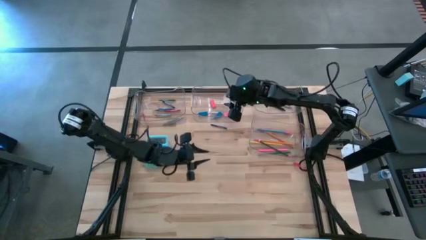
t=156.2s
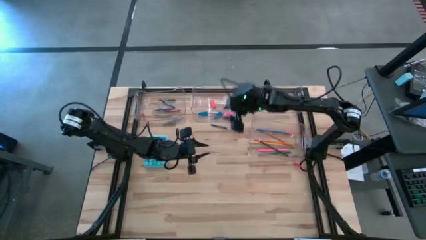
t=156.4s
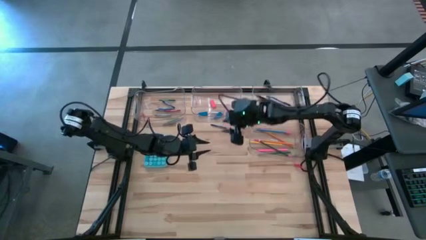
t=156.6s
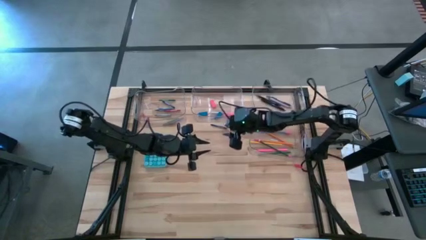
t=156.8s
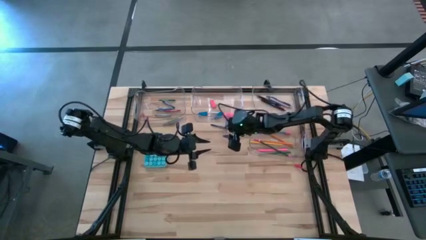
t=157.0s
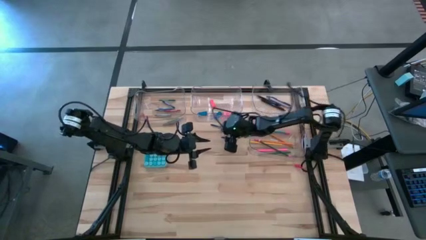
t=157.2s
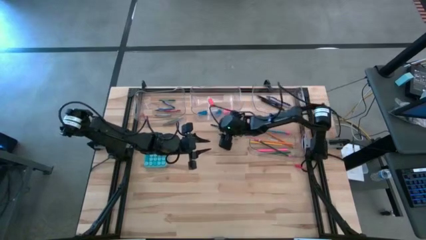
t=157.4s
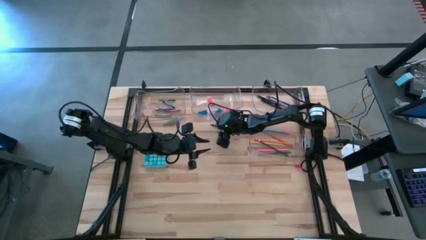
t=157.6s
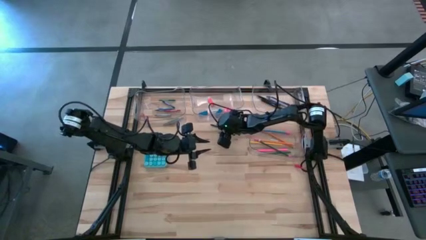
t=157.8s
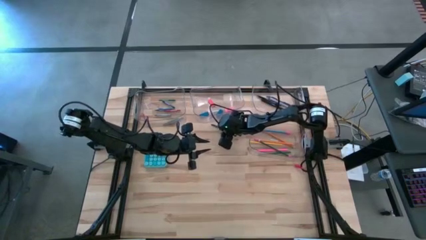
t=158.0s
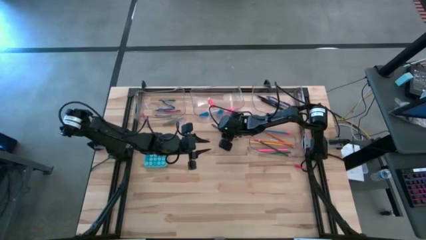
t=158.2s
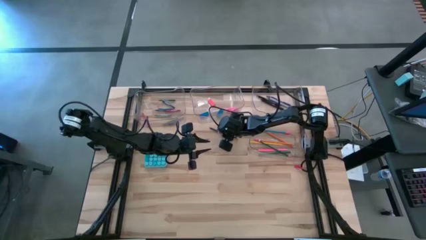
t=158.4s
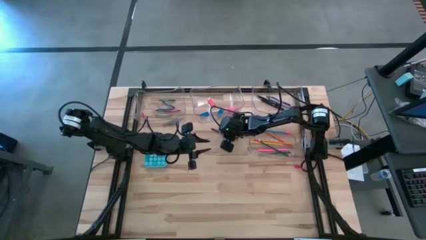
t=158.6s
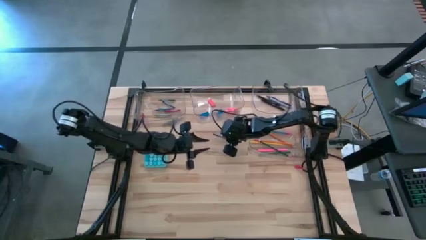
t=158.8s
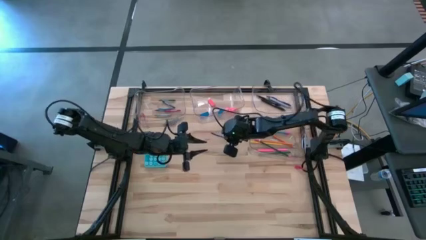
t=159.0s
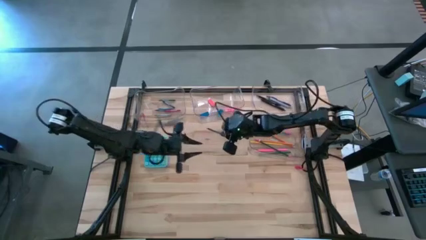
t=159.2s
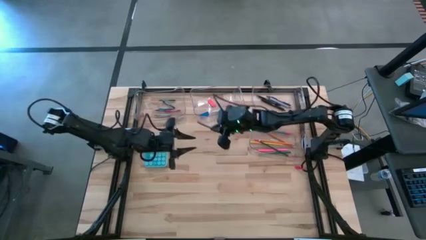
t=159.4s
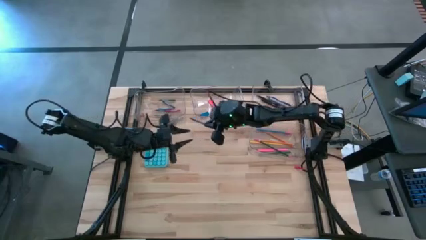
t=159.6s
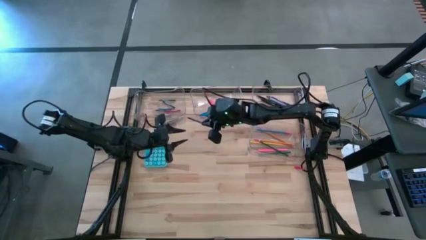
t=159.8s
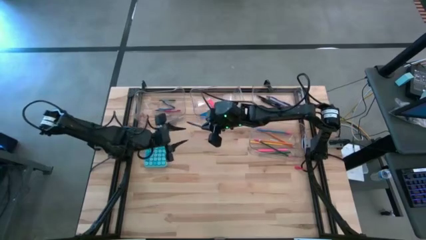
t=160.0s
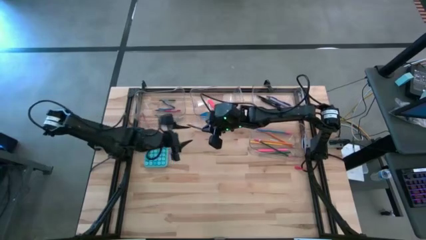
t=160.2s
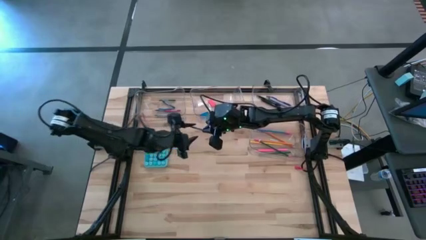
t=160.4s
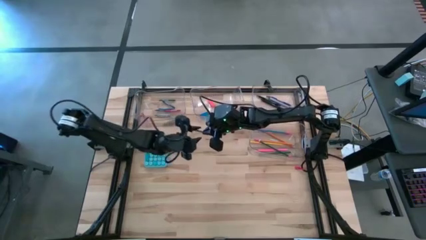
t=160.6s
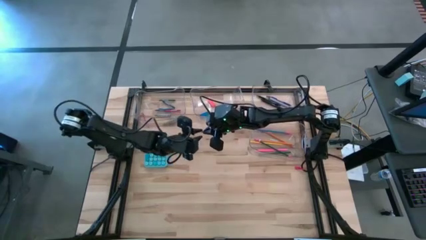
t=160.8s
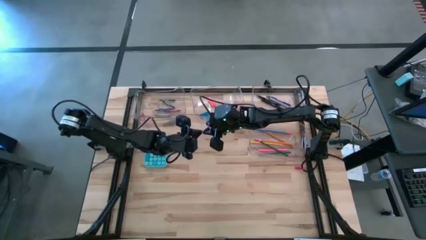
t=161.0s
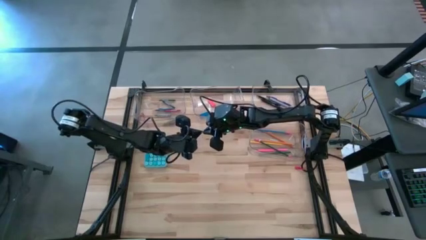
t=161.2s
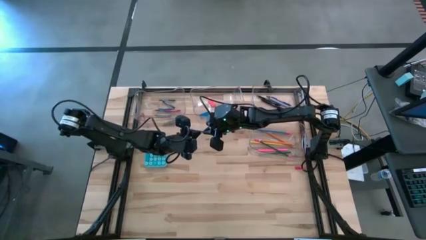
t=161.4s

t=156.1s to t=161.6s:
Task: Sort crayons/erasers/pens/pencils in bins
Put the blue crayon into the top left transparent bin

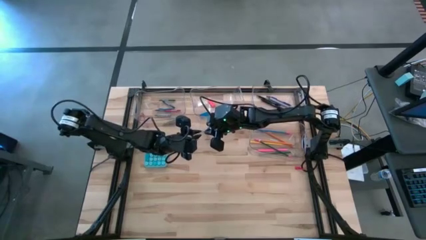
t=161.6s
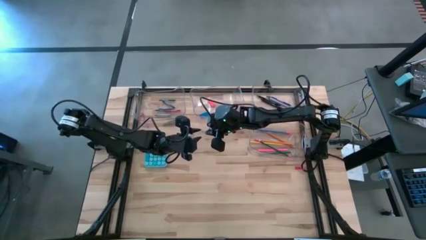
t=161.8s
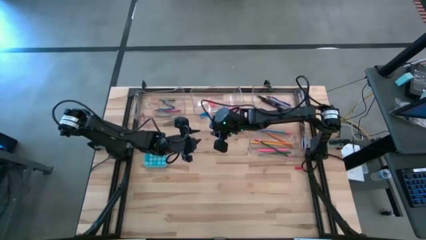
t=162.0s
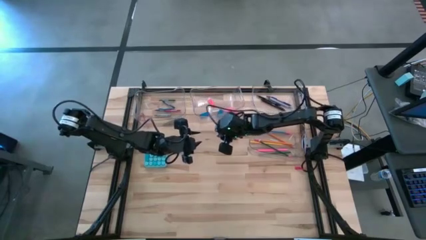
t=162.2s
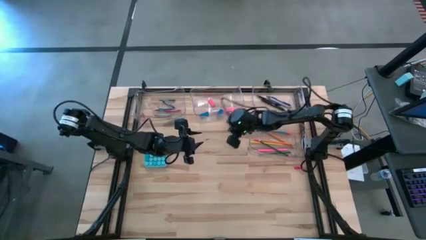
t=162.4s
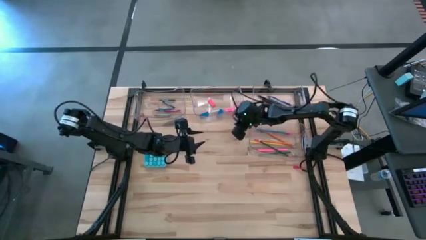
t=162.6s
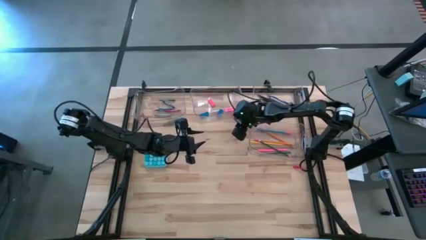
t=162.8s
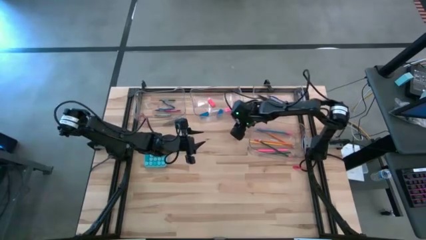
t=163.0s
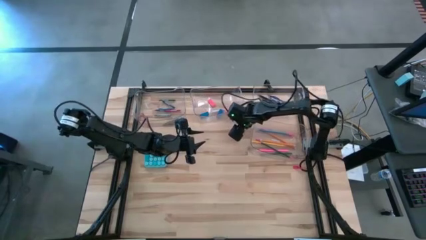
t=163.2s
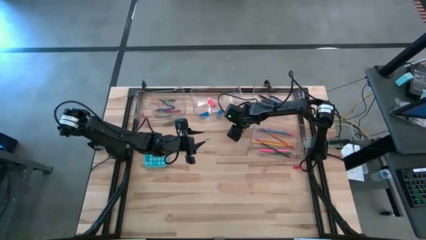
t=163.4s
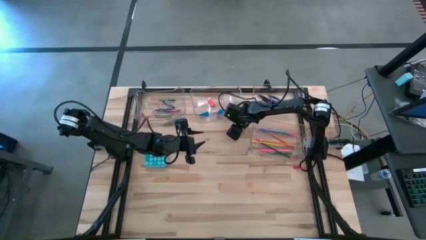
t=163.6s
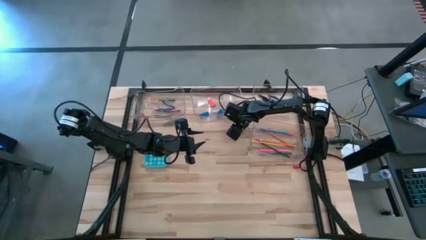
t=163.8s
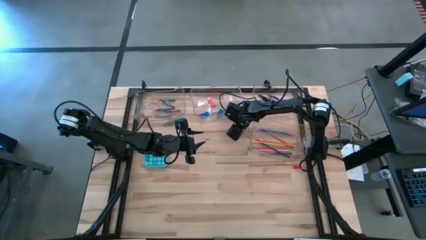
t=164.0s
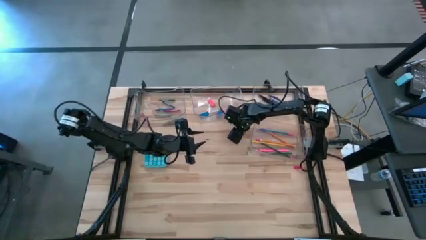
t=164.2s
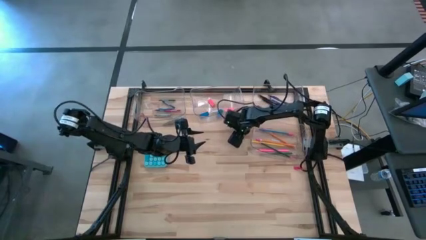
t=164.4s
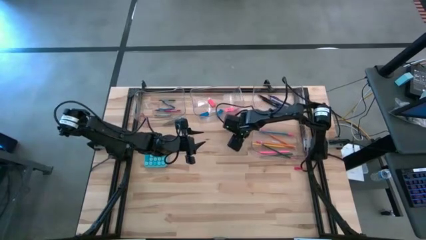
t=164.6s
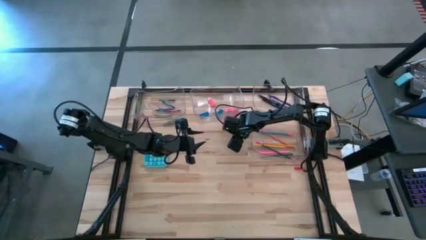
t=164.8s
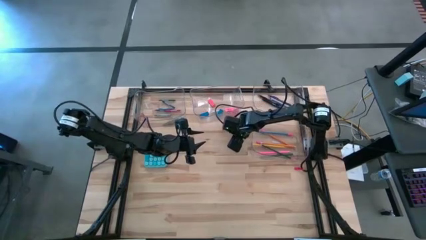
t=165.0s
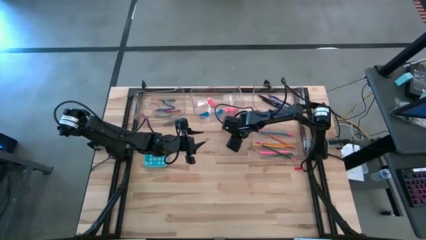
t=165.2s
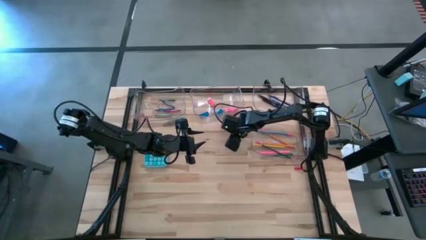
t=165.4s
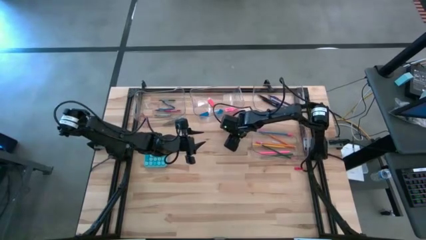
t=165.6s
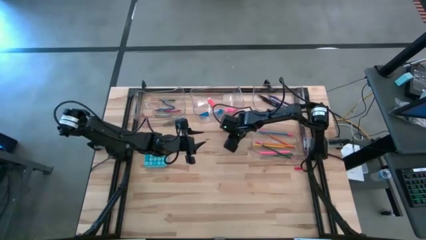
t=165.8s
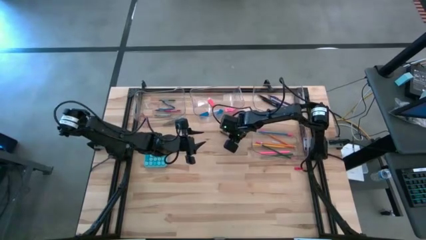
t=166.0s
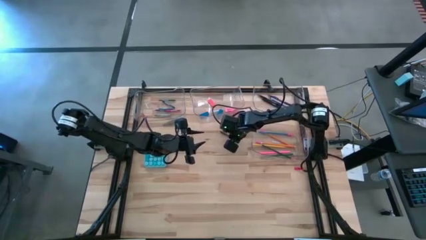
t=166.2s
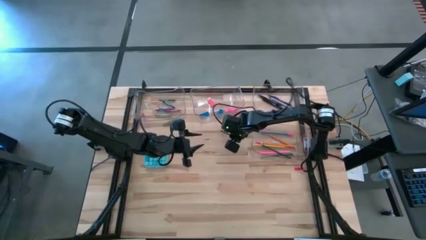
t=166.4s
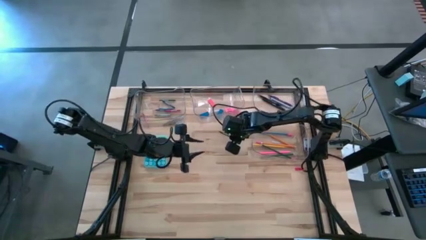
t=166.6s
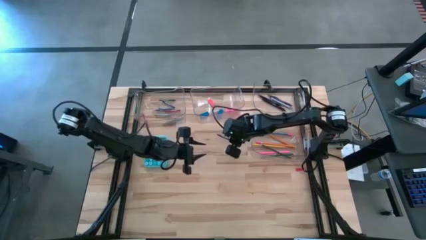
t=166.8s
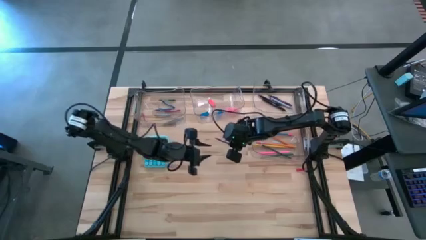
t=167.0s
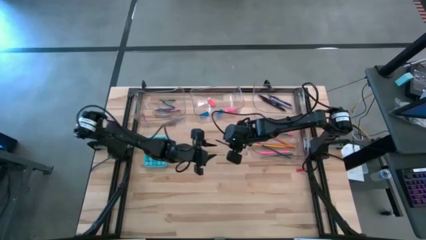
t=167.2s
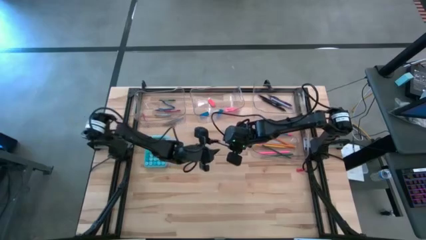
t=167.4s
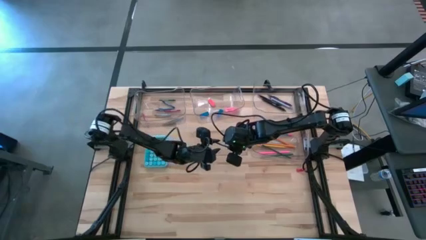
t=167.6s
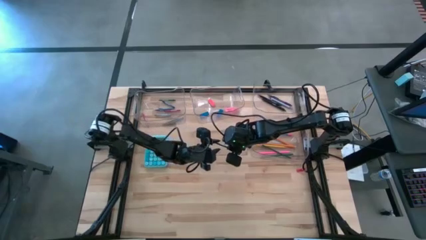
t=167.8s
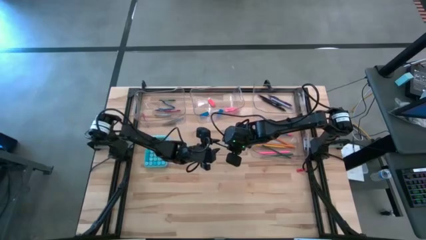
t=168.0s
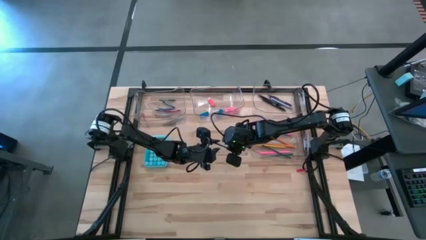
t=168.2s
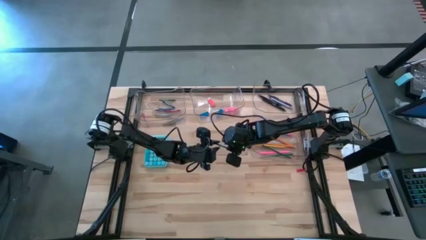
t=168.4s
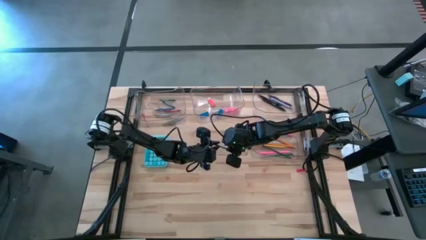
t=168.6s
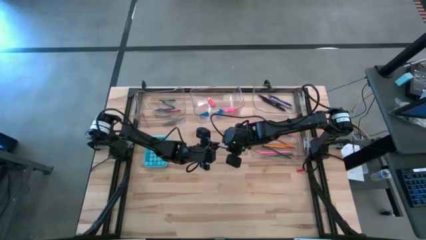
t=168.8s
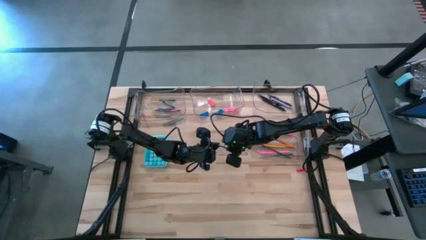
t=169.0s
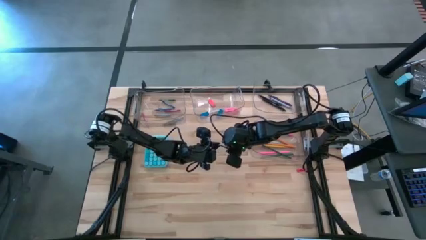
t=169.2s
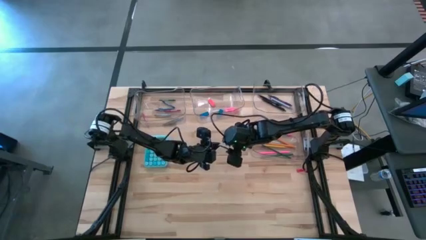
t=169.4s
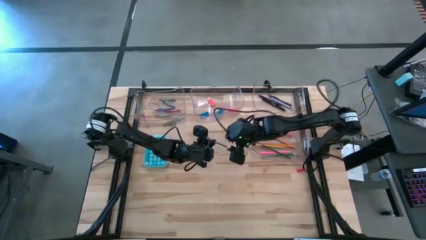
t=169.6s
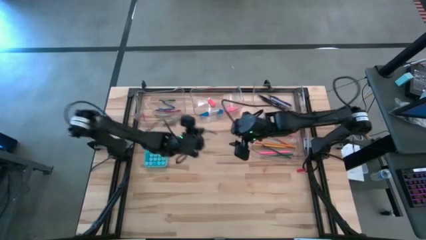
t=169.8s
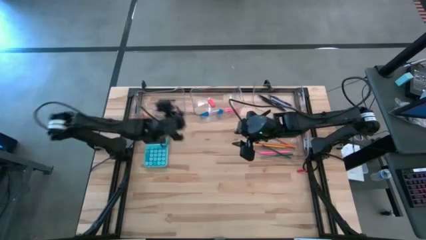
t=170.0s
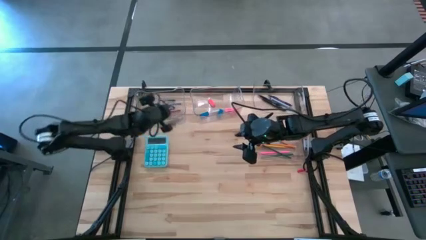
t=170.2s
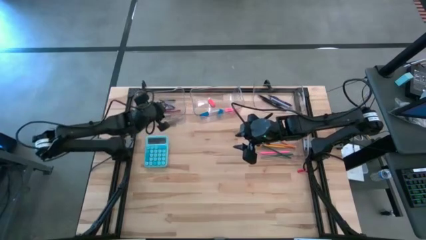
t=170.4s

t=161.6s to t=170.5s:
Put the blue crayon into the top left transparent bin

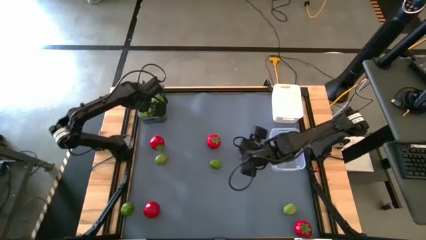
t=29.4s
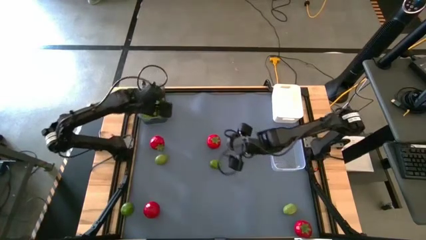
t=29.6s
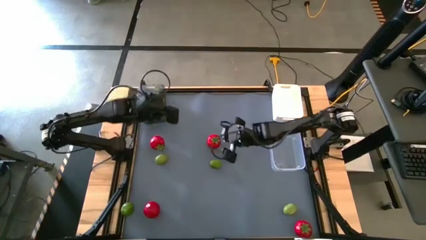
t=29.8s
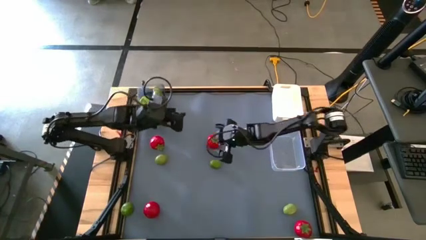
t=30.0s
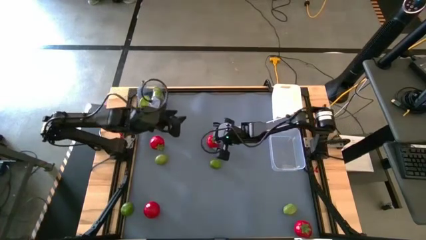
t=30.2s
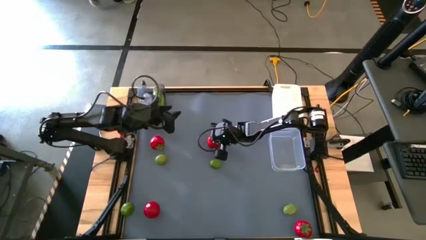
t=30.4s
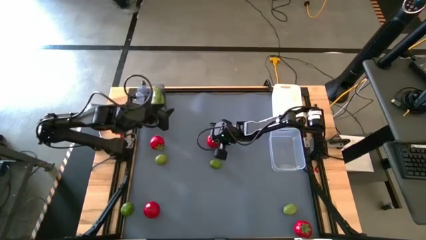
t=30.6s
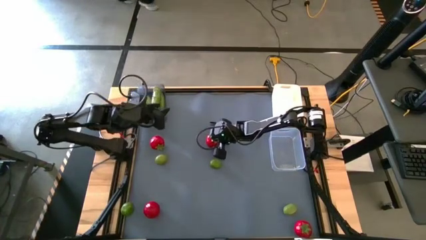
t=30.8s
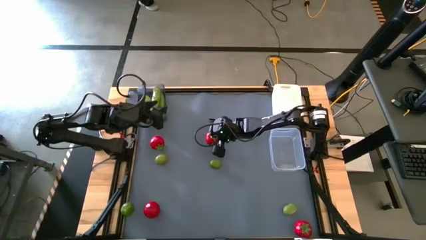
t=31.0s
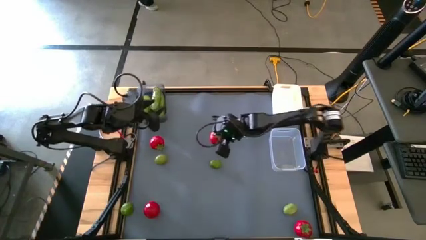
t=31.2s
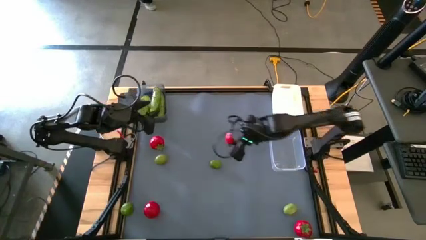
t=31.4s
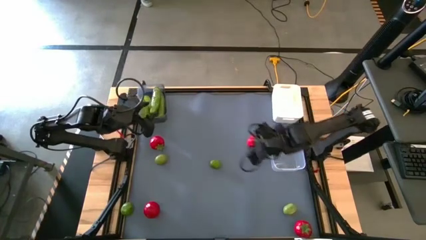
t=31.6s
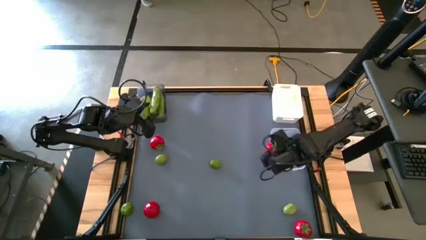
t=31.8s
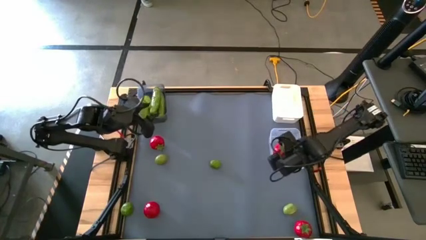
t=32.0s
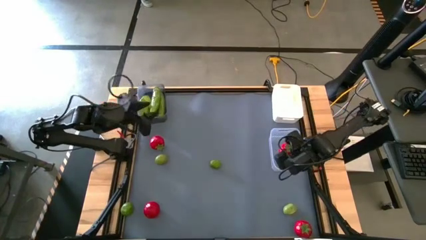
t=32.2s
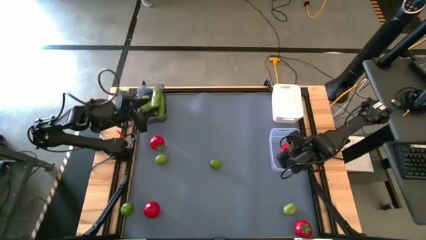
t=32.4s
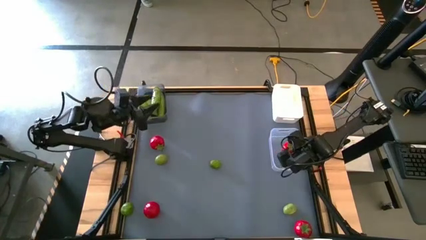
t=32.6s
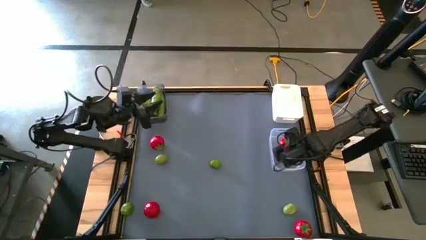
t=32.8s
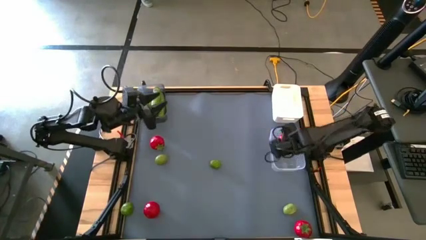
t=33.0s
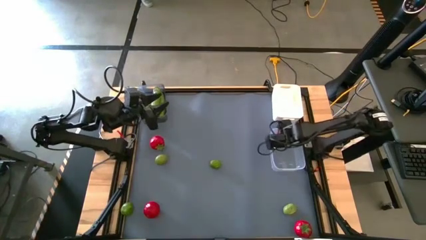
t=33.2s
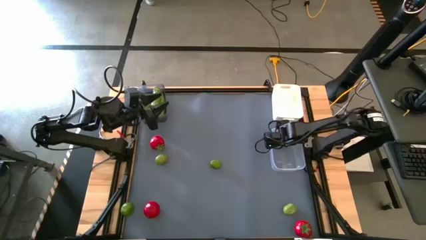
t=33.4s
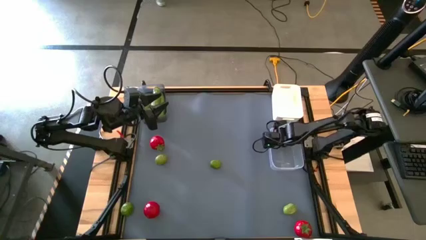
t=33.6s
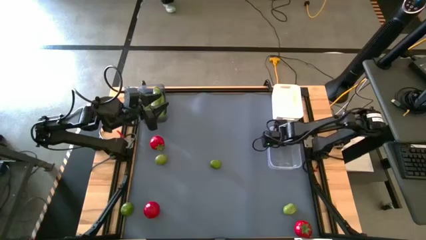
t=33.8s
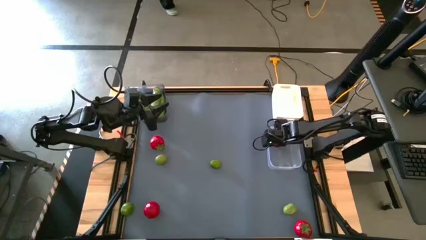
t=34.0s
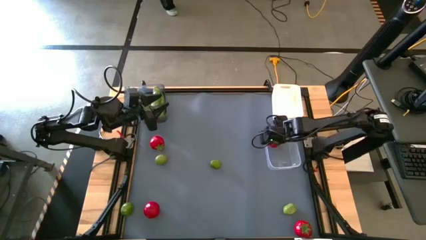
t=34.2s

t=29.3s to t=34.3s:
Task: Sort produce into baskets
Put the tomato into the transparent bin
